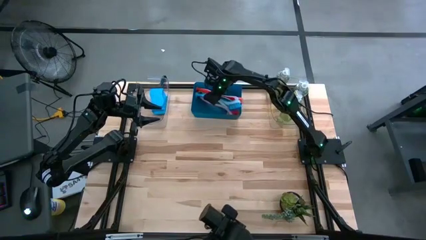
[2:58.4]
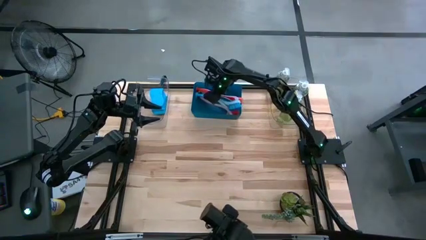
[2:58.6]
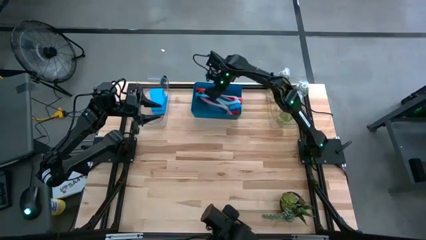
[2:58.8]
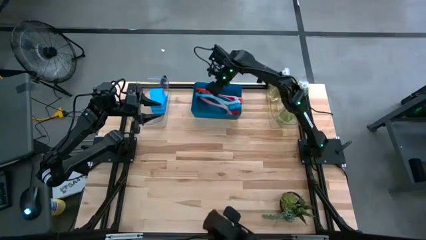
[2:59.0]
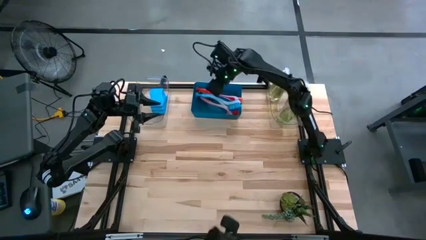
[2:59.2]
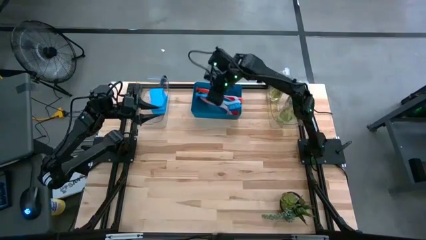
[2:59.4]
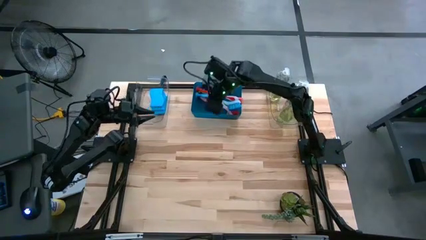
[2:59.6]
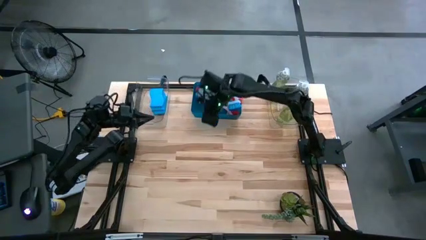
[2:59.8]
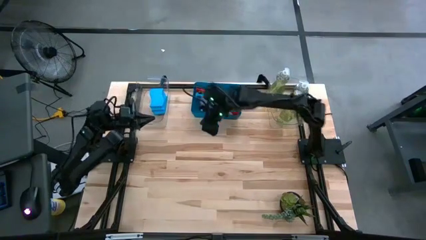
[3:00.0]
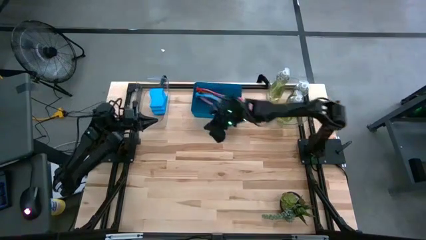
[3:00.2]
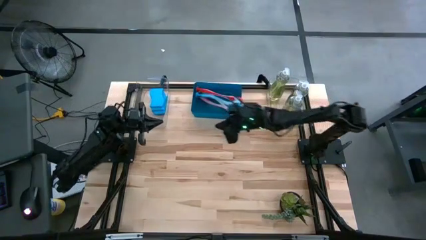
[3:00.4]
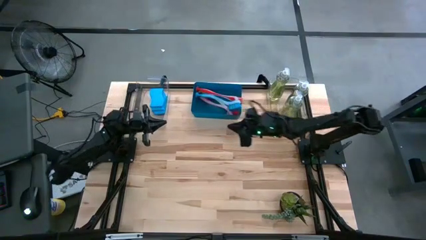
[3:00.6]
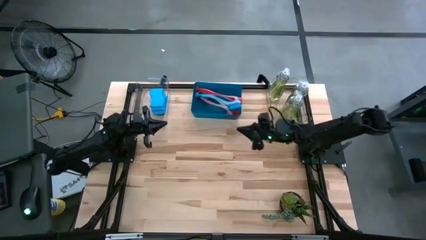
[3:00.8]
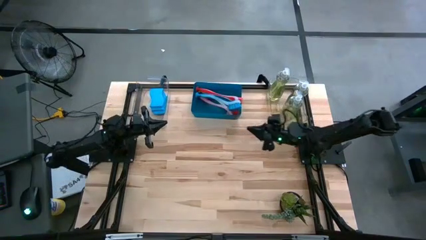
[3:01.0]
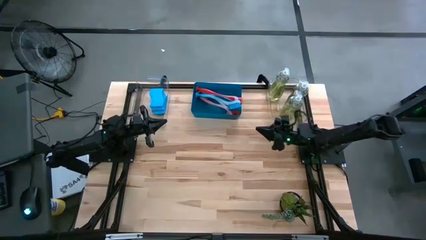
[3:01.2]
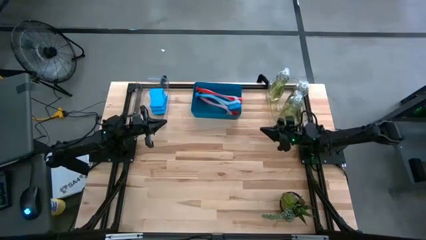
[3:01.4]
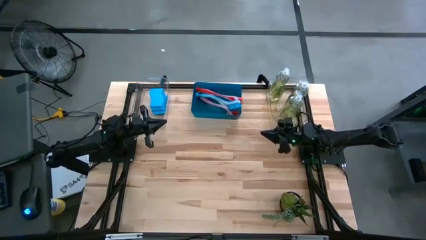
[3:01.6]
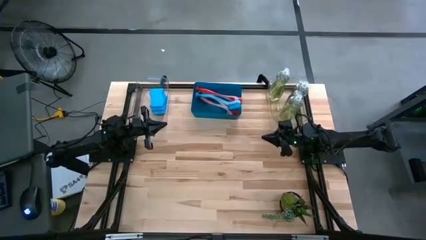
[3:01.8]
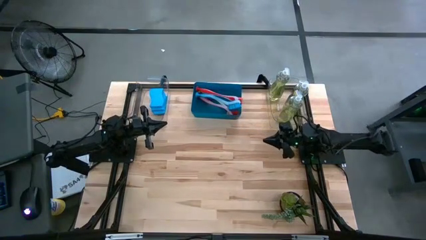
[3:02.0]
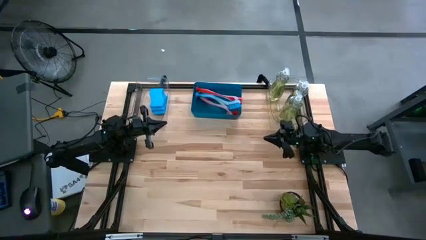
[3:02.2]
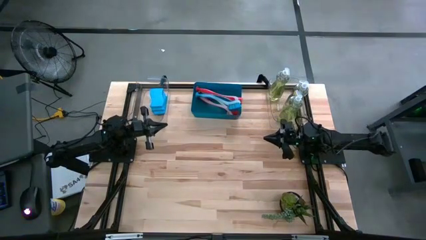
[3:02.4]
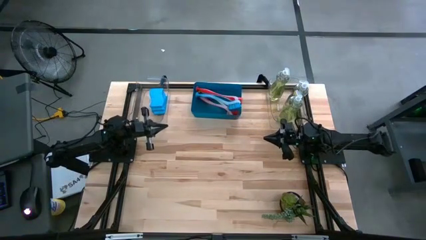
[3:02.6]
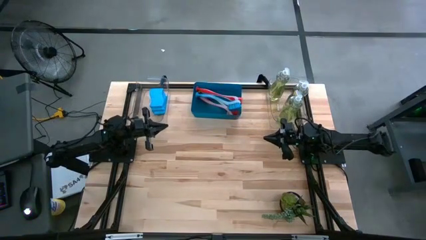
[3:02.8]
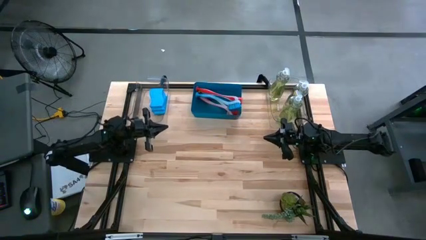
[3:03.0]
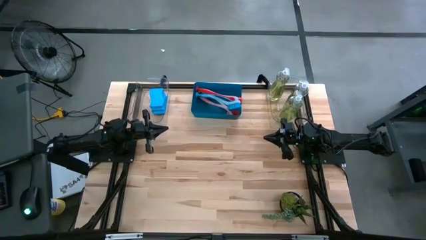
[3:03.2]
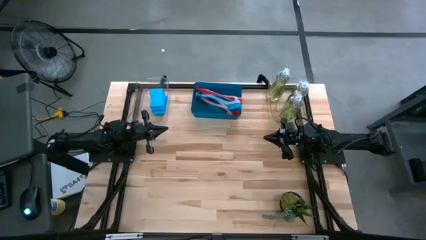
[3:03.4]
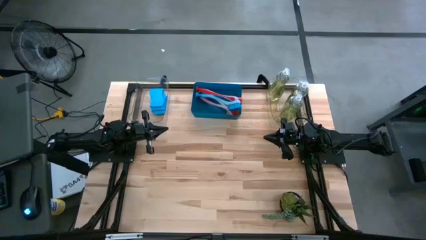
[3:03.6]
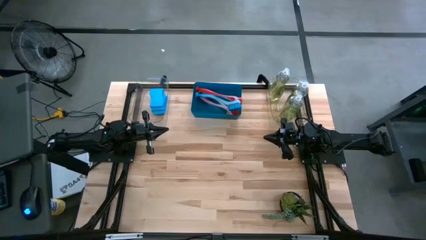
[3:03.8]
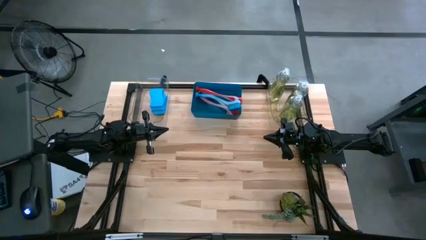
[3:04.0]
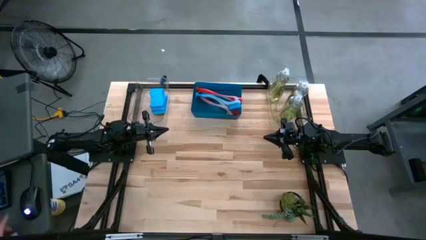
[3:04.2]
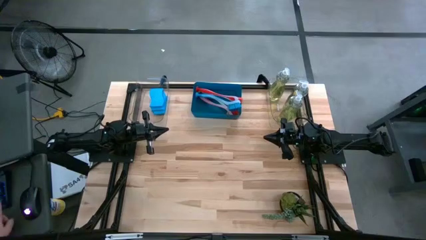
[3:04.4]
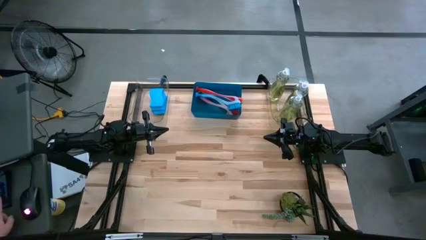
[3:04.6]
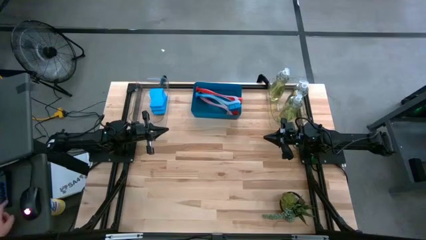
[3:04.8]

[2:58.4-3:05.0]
Task: Pick & Place Kitchen Sink Supplies
Return to Home Position

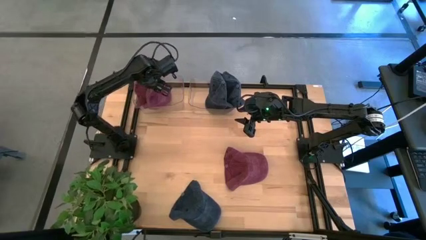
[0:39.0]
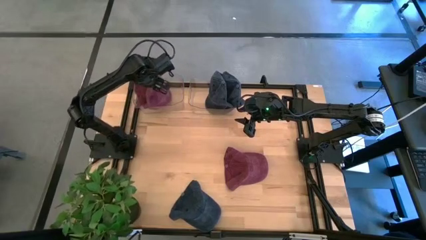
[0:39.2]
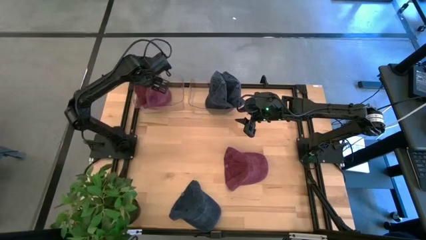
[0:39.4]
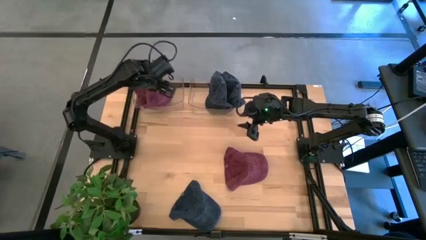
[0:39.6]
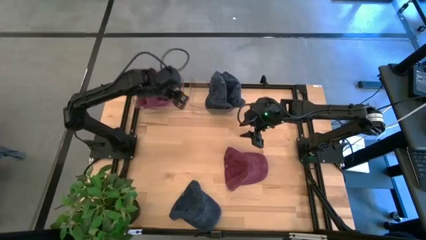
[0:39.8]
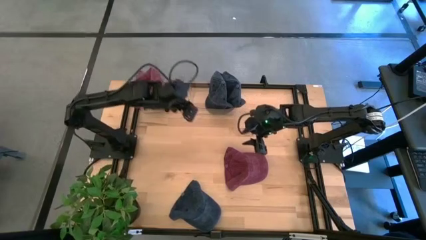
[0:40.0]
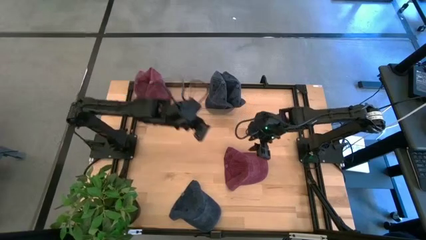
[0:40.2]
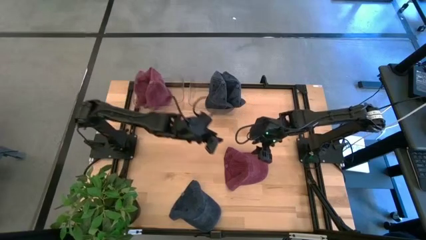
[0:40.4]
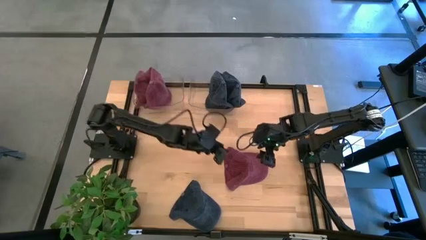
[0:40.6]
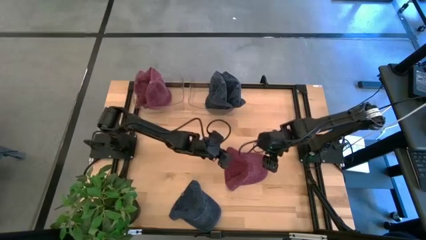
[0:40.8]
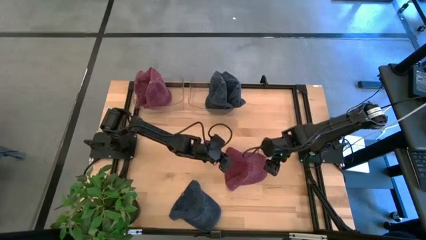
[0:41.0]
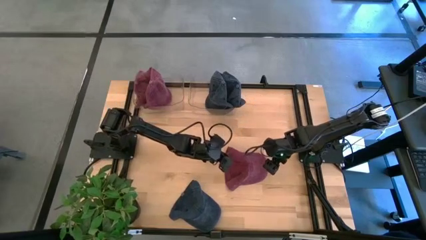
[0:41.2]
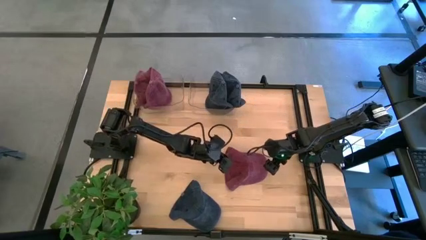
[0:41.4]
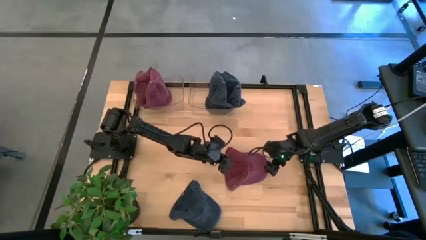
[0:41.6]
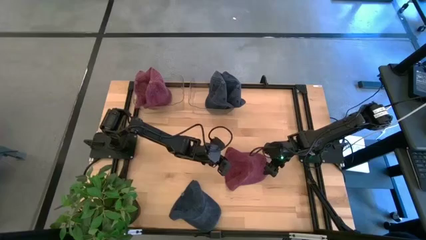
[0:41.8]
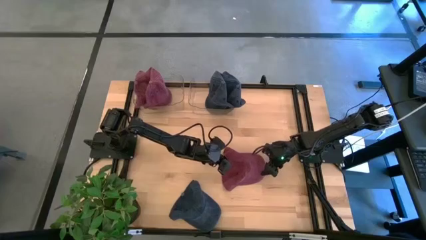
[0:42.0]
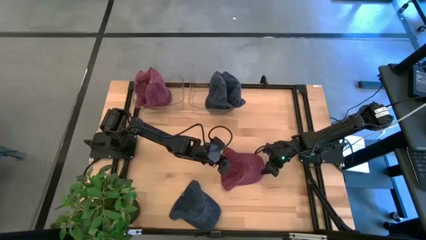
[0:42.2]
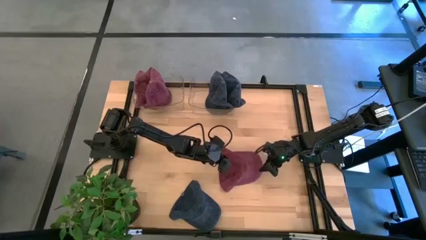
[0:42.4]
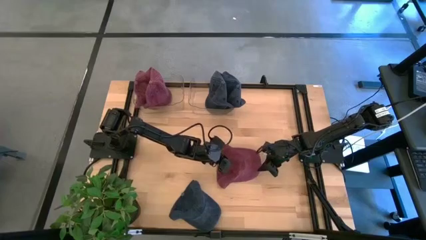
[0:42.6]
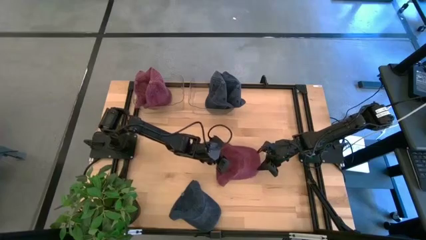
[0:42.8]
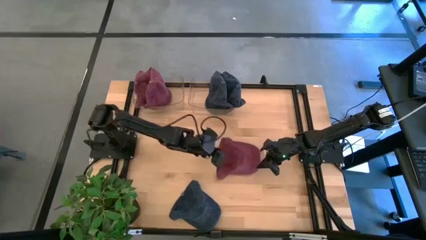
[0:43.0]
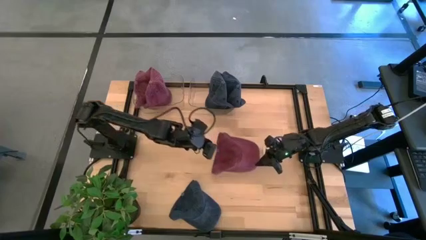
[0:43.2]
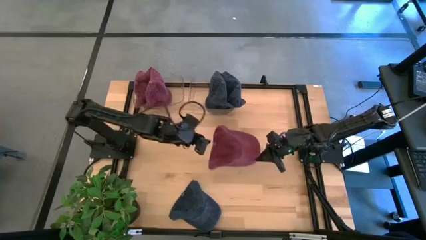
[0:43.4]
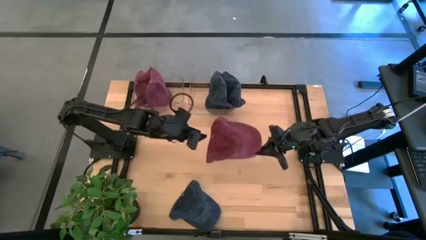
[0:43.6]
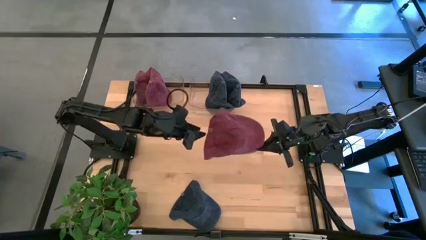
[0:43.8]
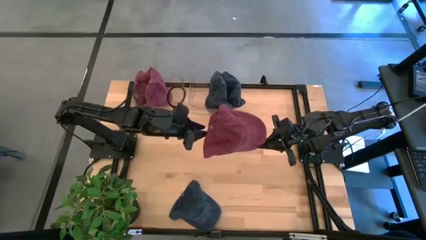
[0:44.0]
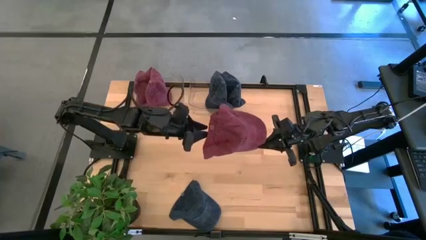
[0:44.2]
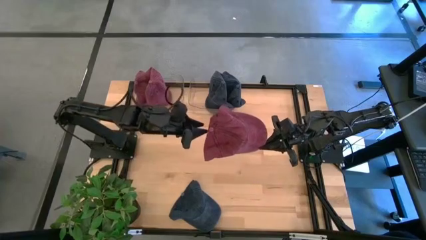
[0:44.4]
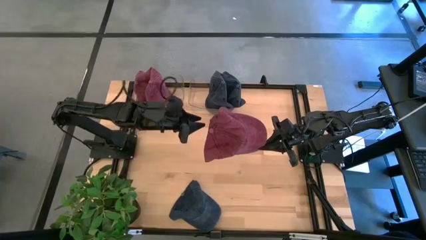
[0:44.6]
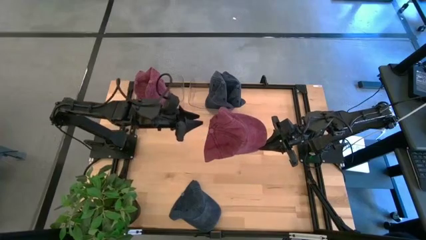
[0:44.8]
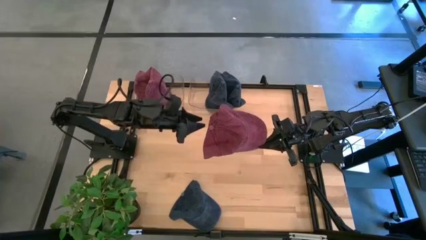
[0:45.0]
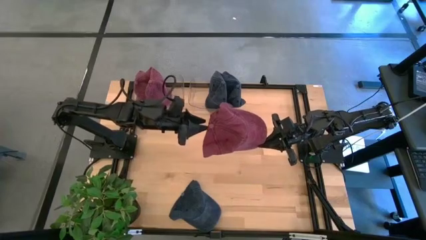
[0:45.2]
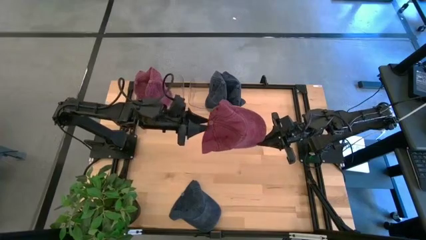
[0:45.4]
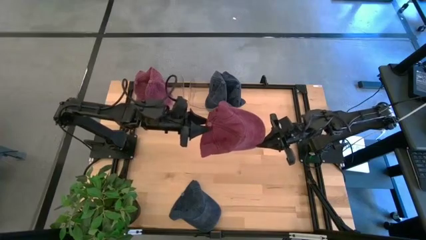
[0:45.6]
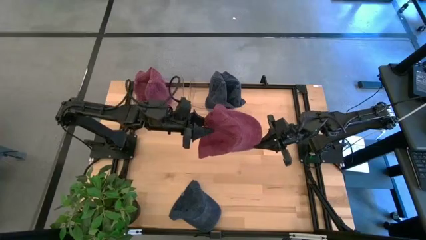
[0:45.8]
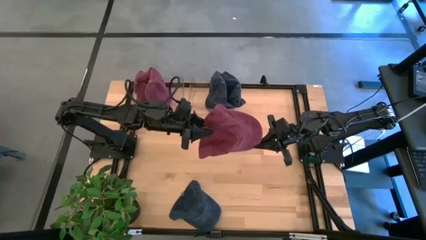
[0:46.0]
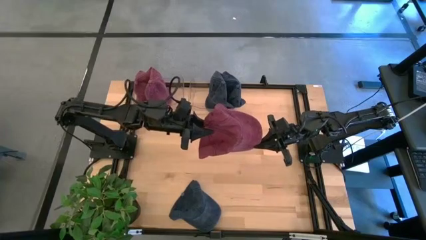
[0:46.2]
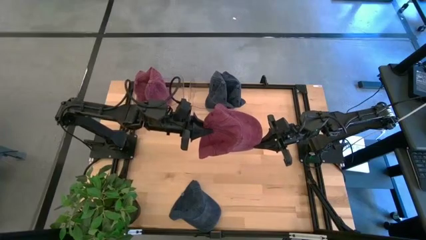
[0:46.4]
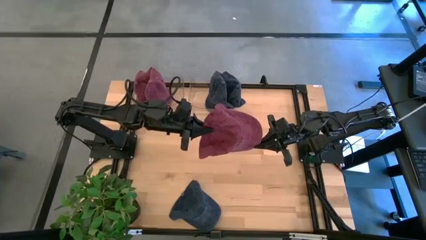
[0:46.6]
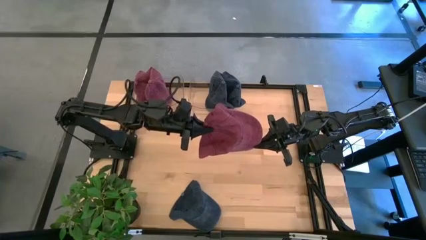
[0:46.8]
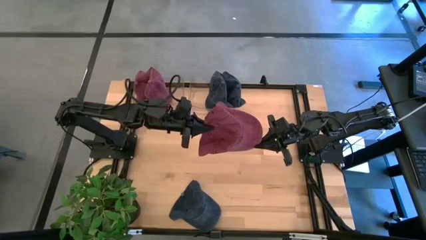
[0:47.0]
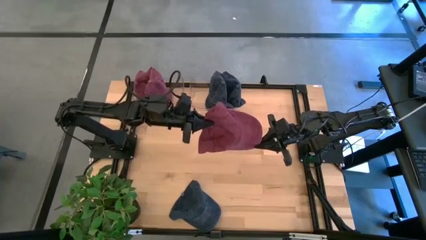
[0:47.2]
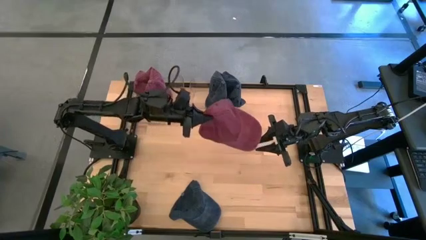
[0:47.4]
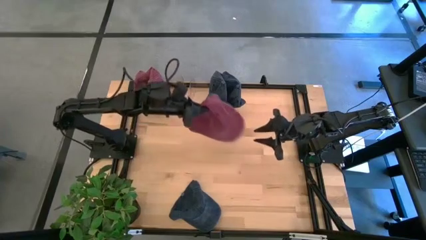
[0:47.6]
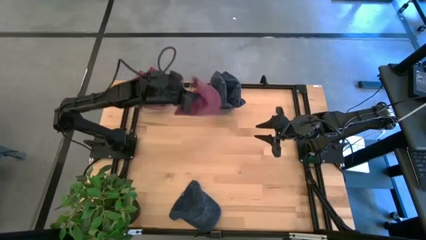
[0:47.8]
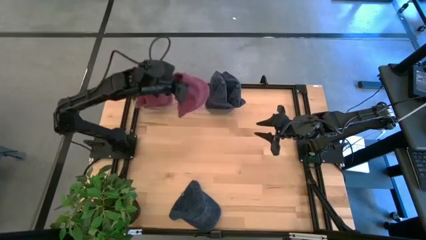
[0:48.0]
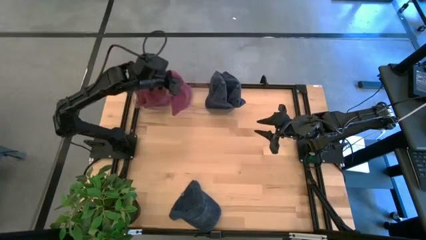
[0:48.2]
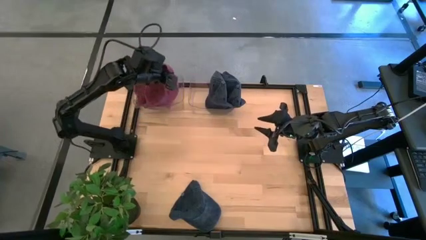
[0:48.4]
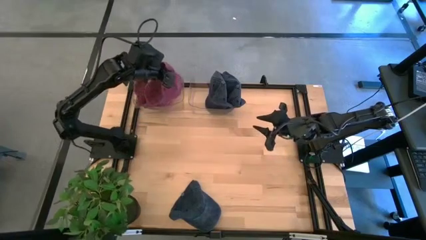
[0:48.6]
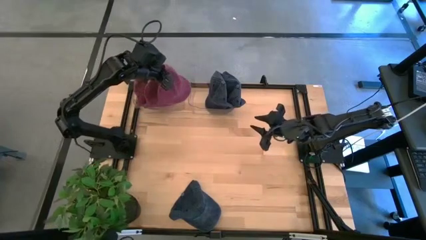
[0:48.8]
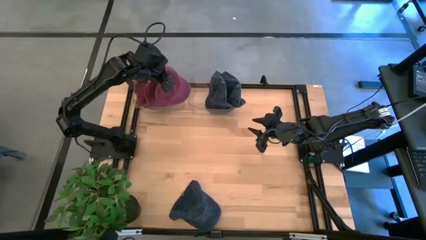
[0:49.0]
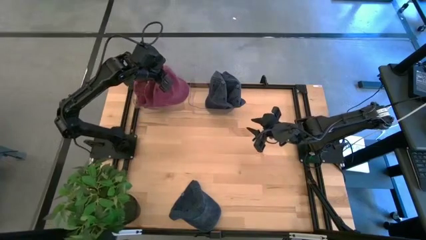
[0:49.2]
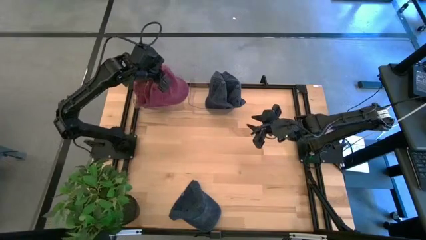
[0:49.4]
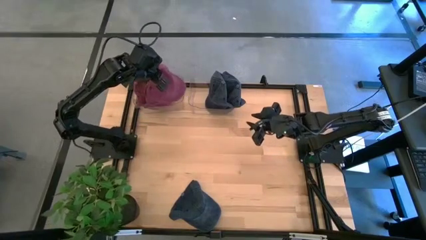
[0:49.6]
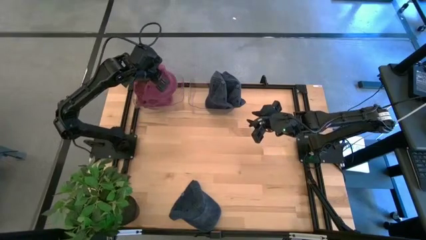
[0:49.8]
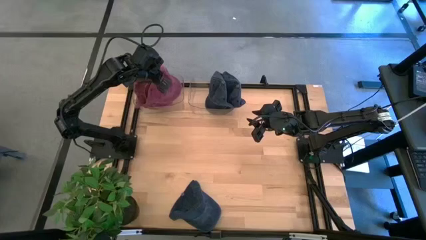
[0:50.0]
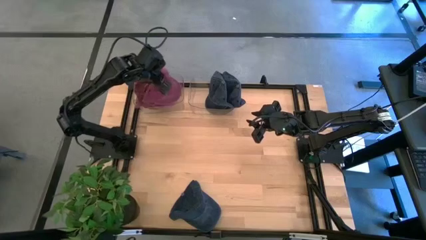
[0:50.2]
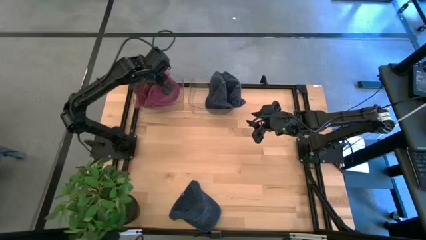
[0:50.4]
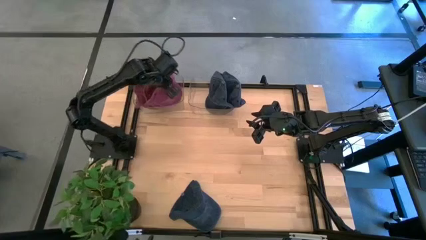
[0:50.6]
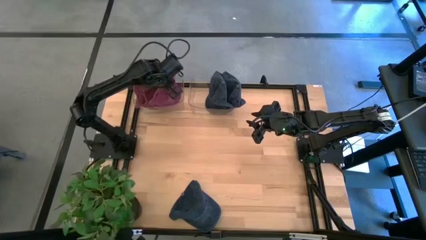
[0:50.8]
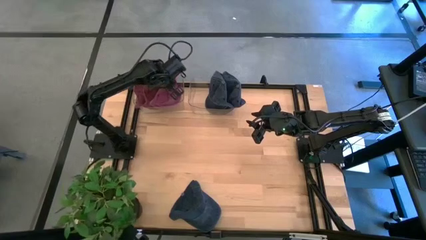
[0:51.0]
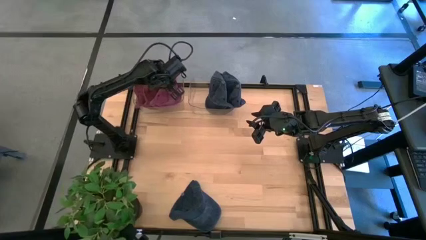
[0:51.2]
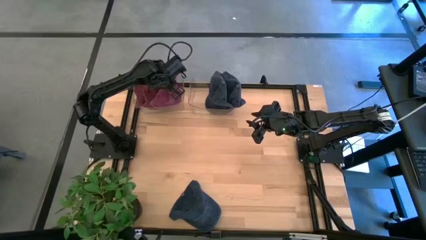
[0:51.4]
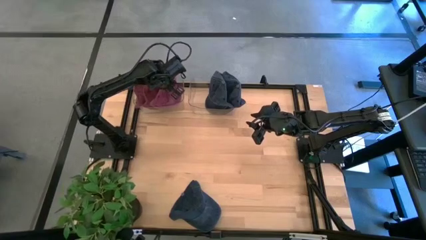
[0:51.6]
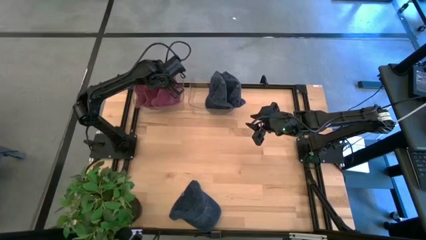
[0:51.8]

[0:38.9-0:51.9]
Task: Pick & Place hat
Put the dark red cap into the left transparent bin
